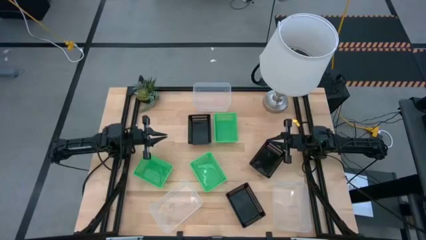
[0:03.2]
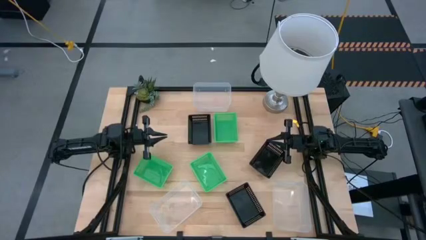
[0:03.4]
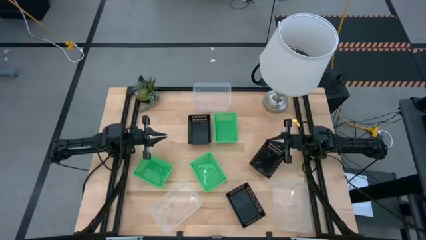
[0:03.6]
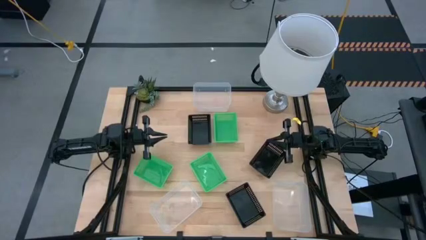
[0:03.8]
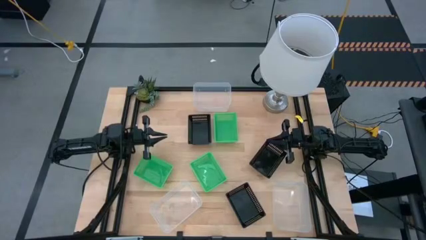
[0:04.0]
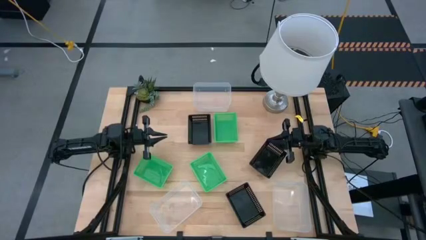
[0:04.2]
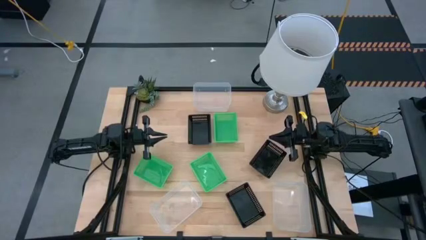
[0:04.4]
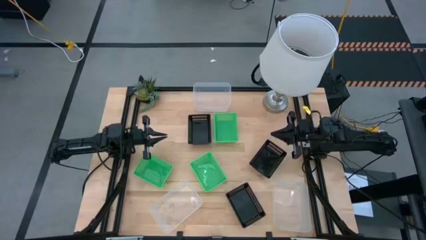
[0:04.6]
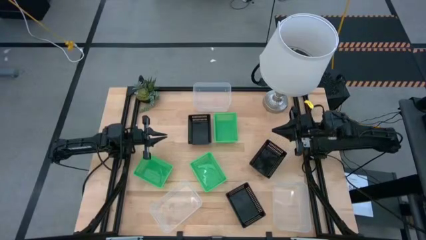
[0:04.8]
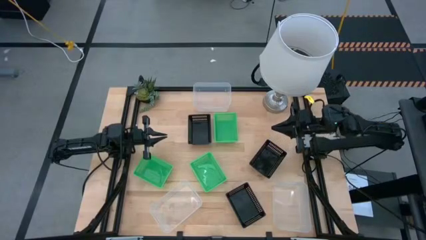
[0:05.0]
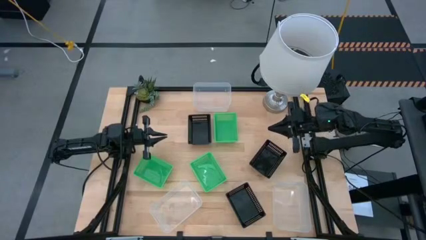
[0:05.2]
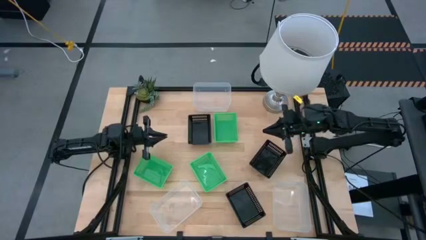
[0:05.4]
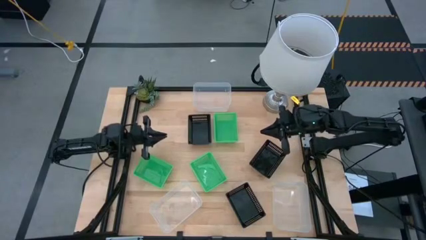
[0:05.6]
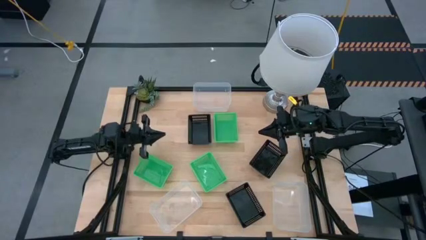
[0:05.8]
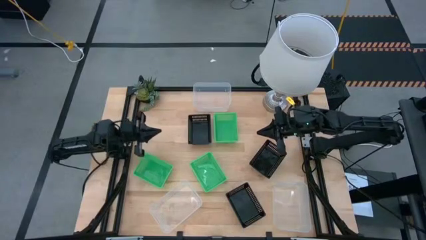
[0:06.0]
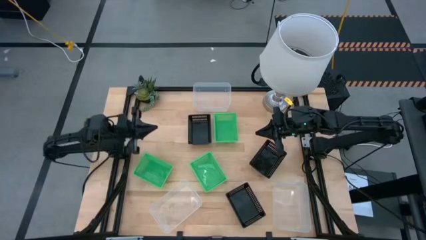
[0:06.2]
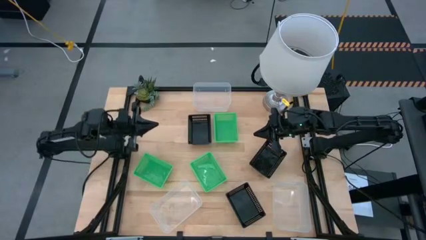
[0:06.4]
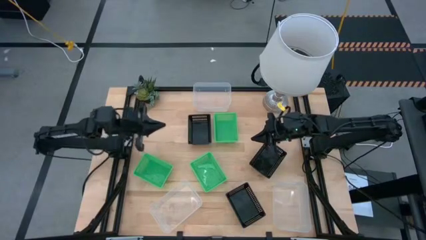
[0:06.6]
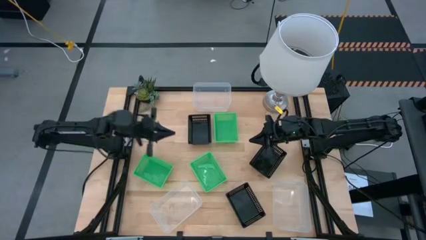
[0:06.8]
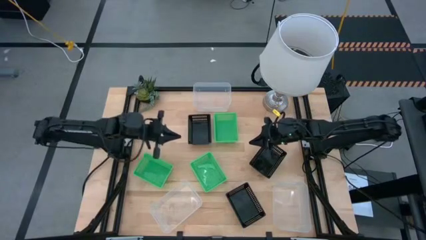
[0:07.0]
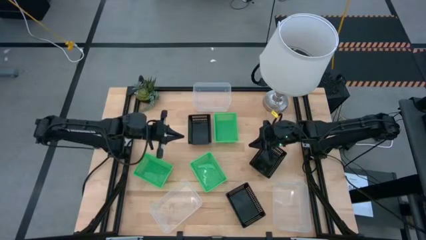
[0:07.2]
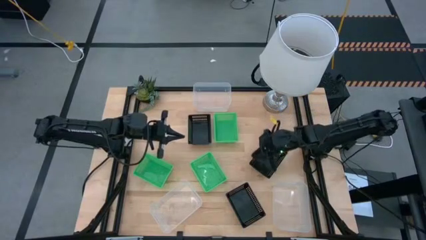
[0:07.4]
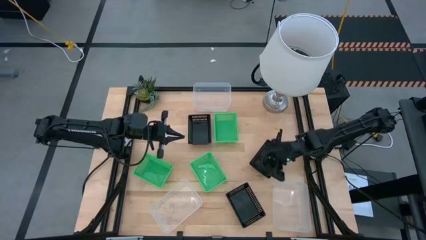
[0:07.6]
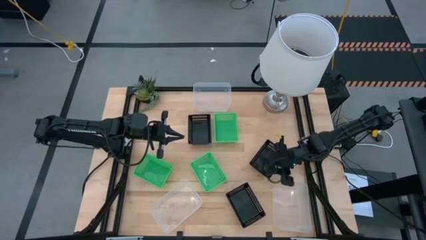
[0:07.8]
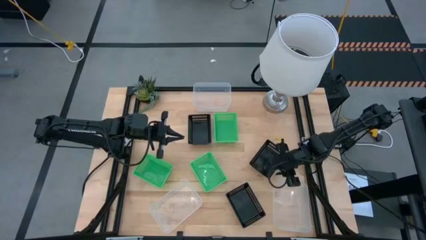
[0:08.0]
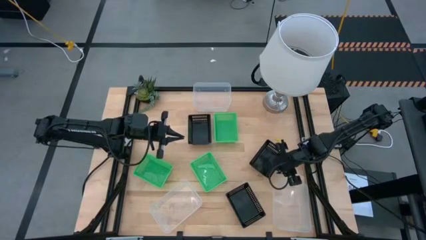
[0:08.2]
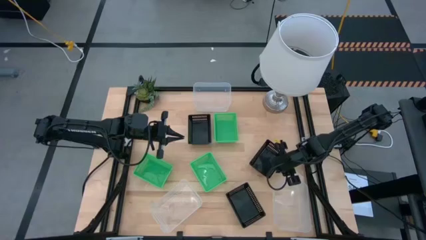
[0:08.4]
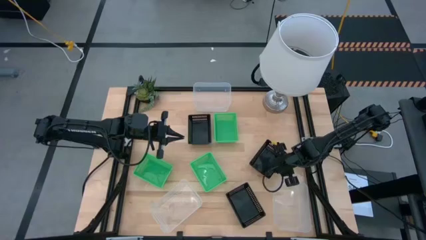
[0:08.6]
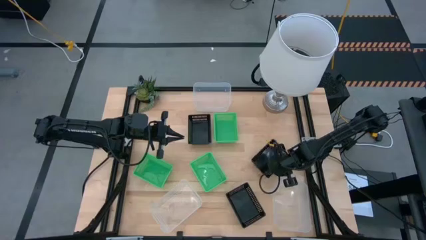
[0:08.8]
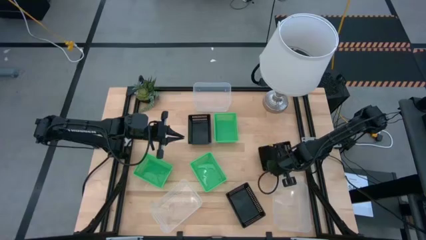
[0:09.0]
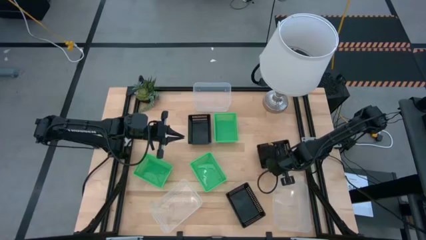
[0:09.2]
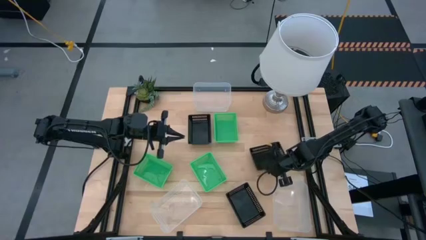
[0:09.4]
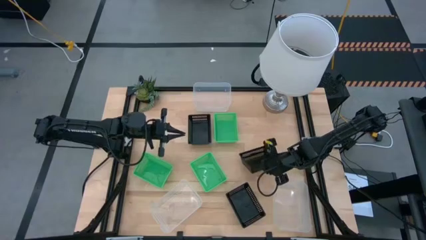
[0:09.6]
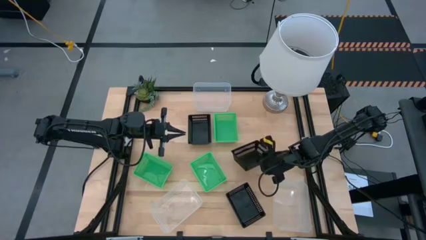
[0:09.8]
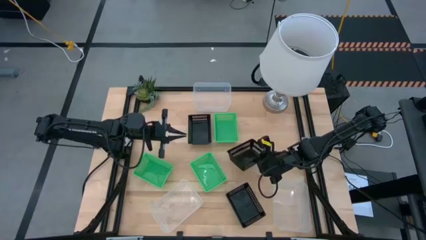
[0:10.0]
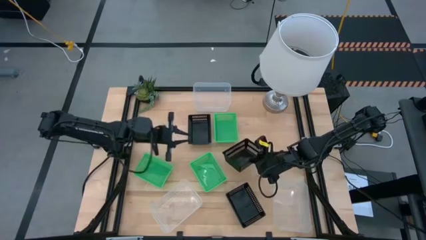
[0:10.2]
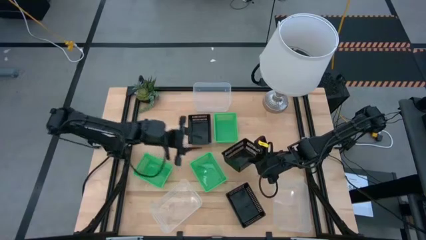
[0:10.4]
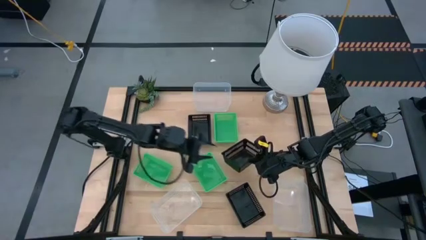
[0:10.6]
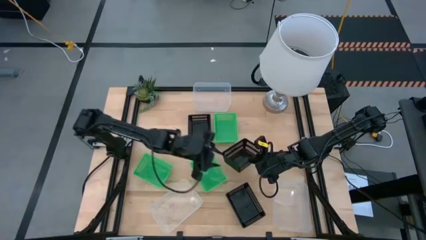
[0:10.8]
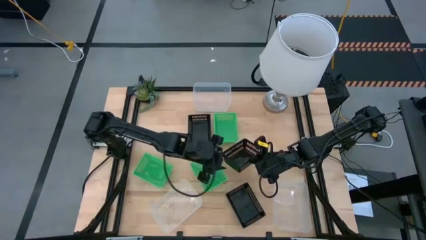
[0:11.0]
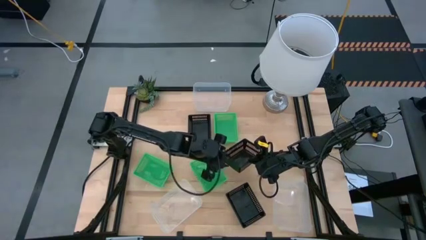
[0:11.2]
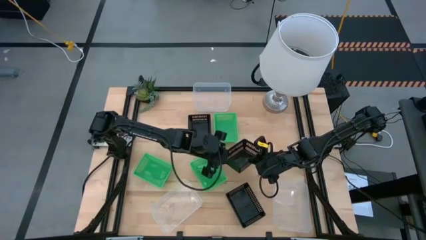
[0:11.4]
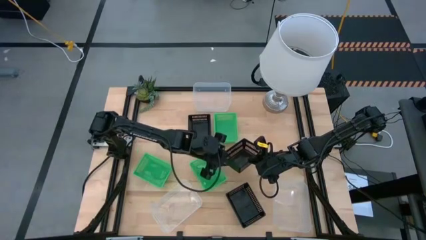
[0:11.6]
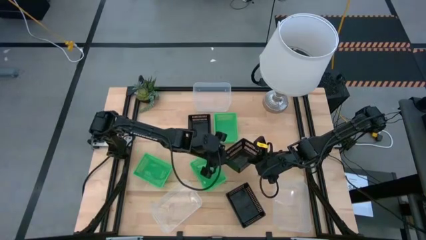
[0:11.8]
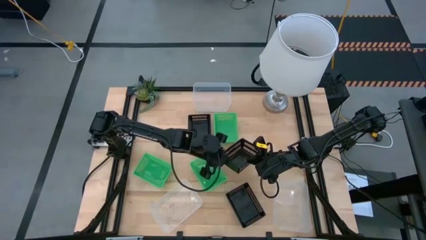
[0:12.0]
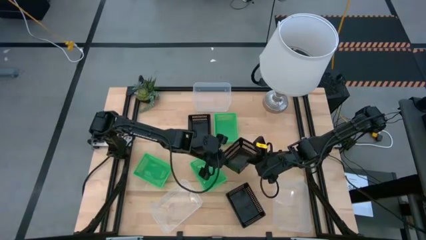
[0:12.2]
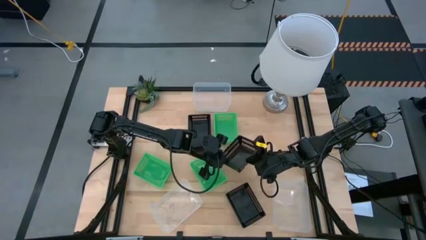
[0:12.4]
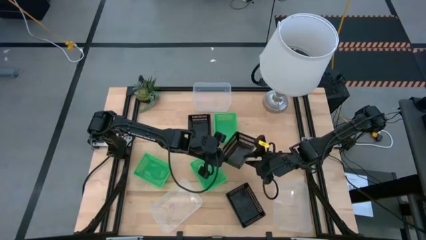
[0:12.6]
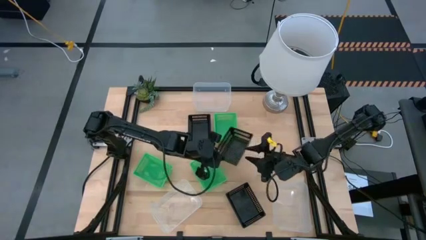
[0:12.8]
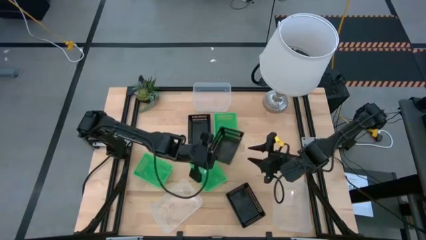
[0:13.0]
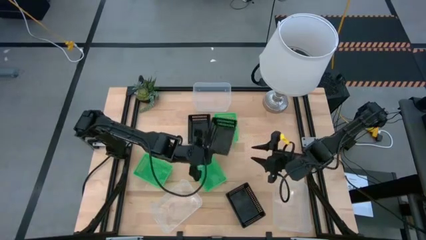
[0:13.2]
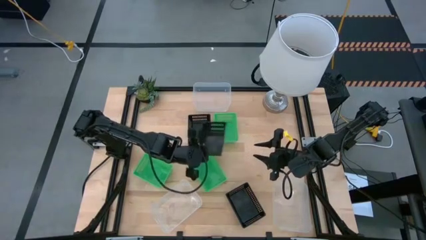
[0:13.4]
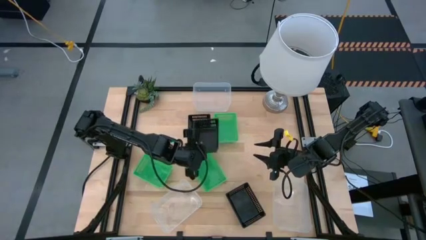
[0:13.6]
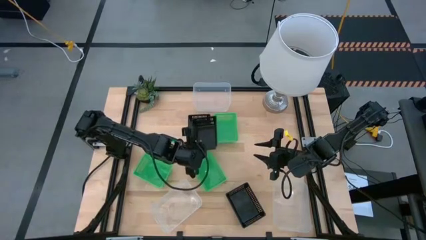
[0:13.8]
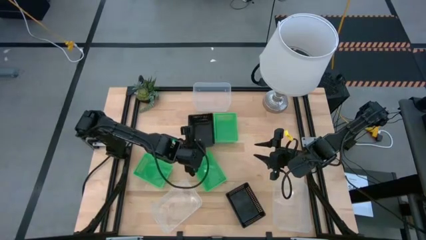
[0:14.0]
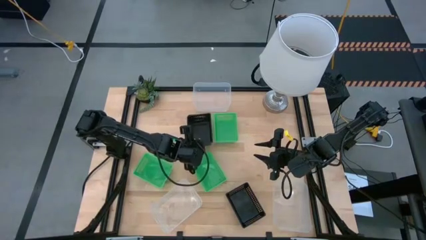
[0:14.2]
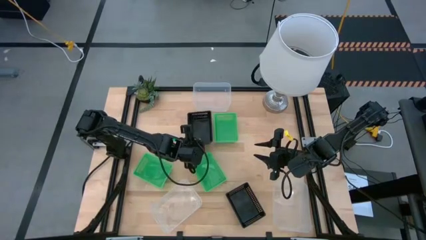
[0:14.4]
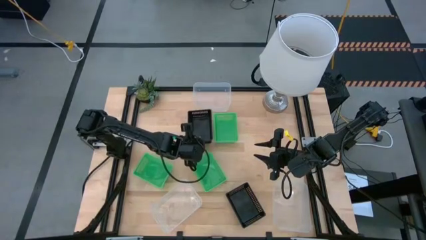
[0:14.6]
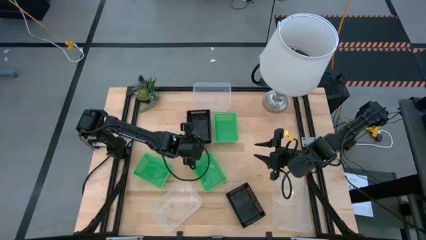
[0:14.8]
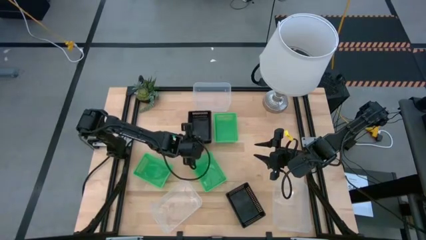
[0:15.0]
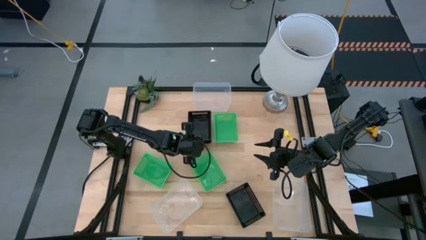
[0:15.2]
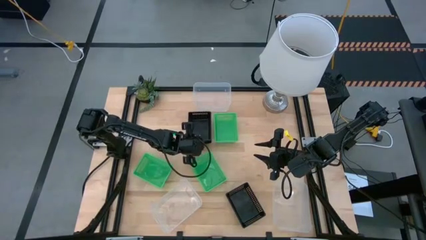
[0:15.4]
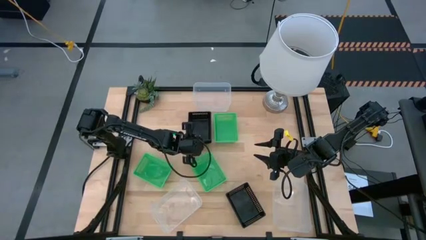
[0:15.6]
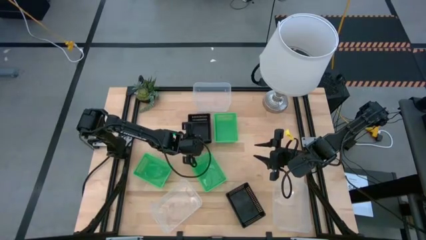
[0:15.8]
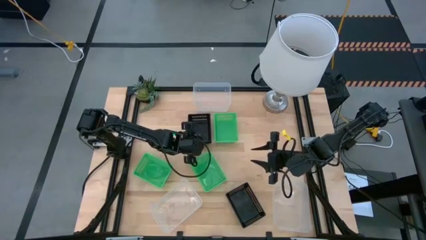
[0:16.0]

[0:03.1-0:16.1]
Stack the middle black bin on the top left black bin
